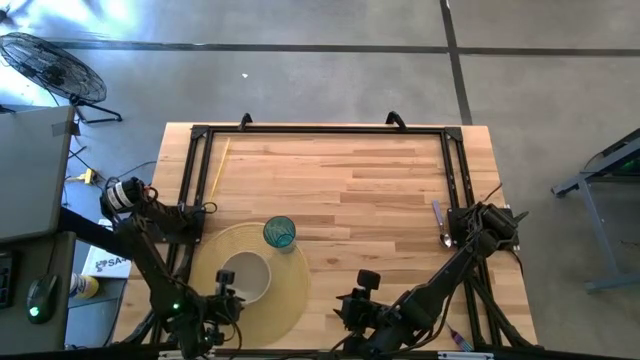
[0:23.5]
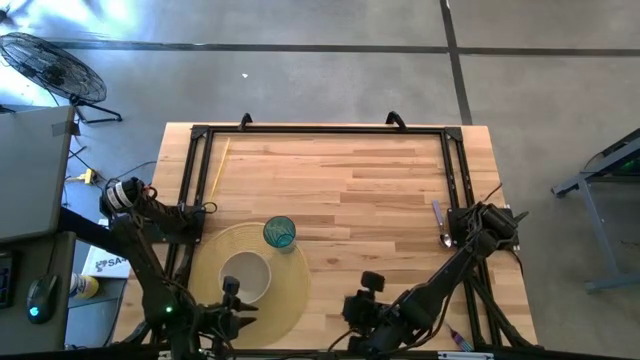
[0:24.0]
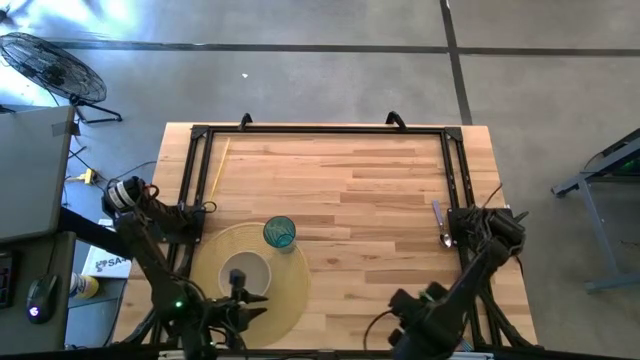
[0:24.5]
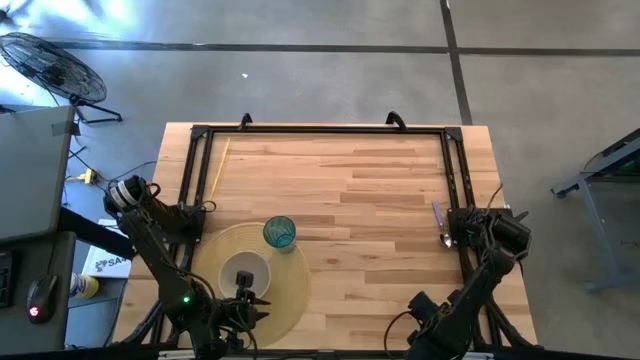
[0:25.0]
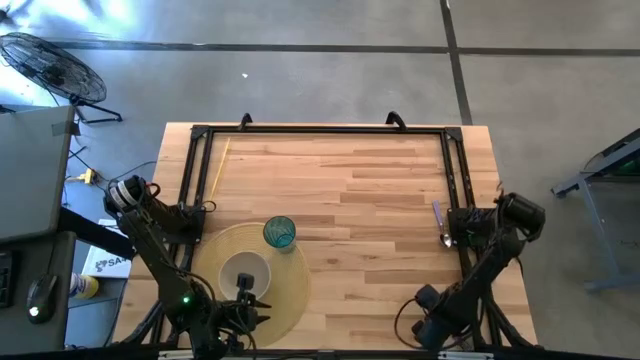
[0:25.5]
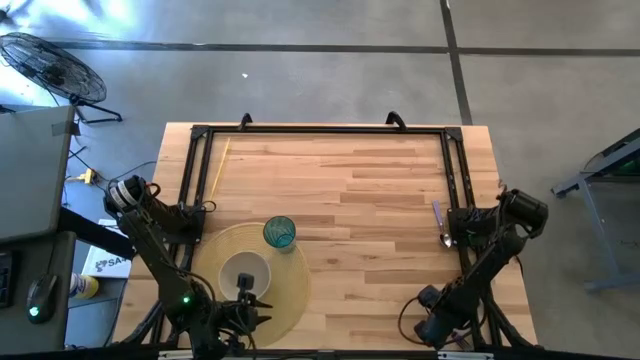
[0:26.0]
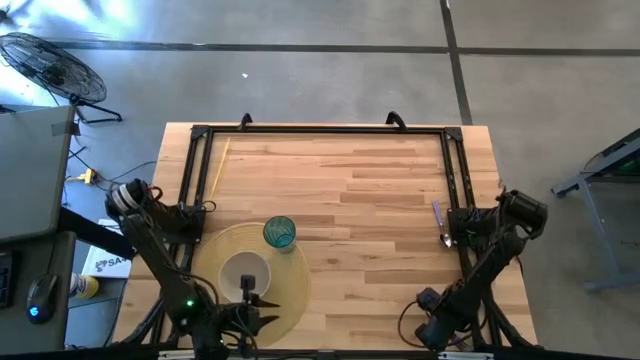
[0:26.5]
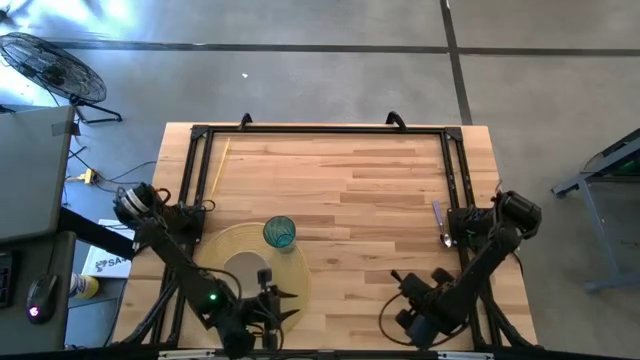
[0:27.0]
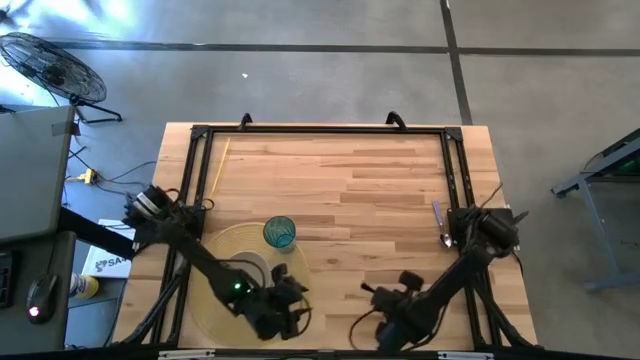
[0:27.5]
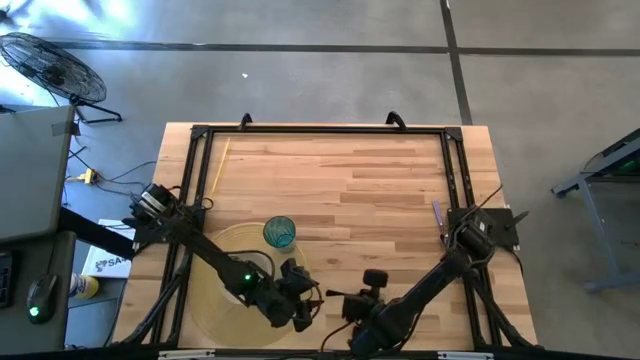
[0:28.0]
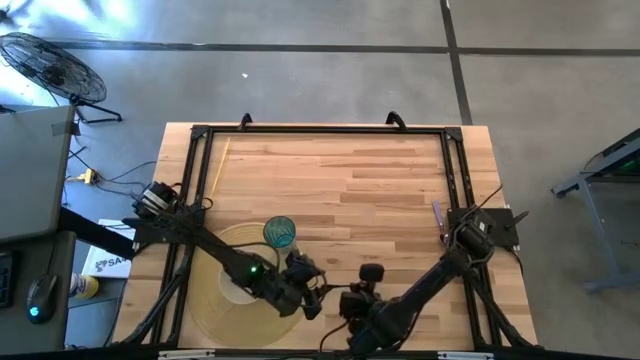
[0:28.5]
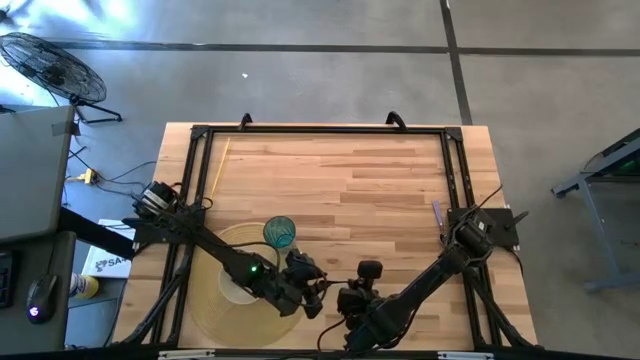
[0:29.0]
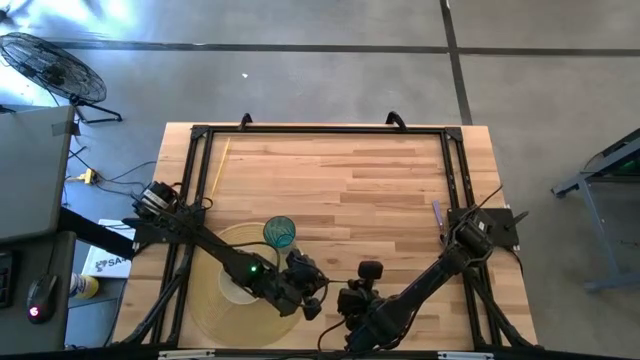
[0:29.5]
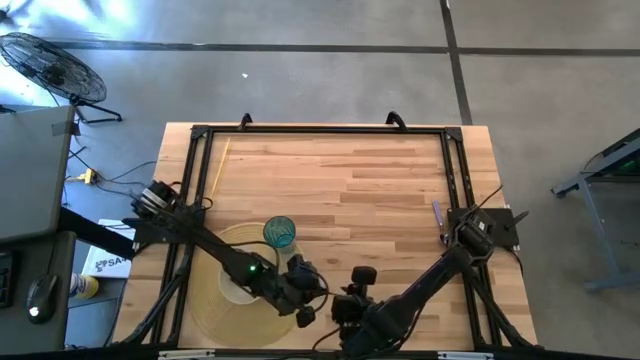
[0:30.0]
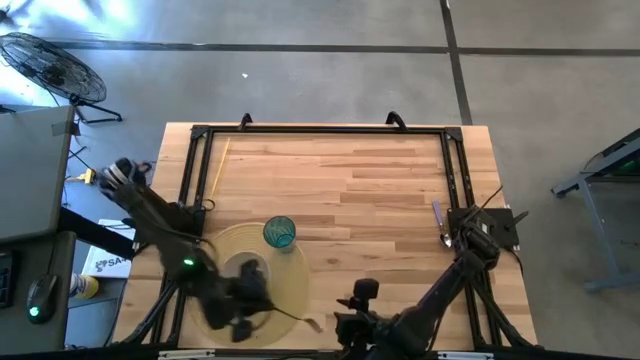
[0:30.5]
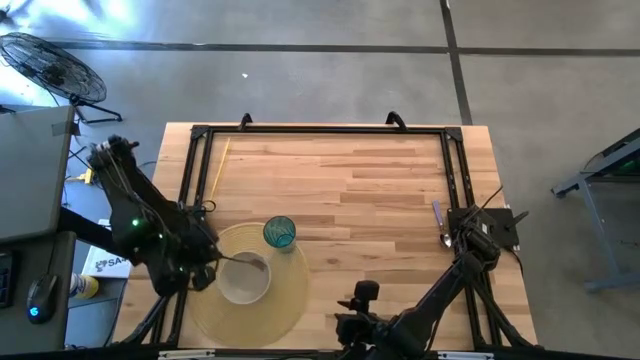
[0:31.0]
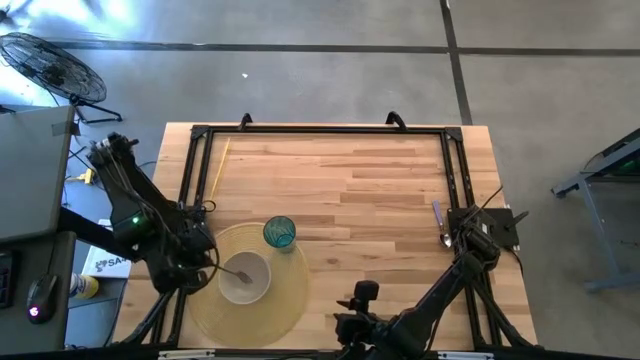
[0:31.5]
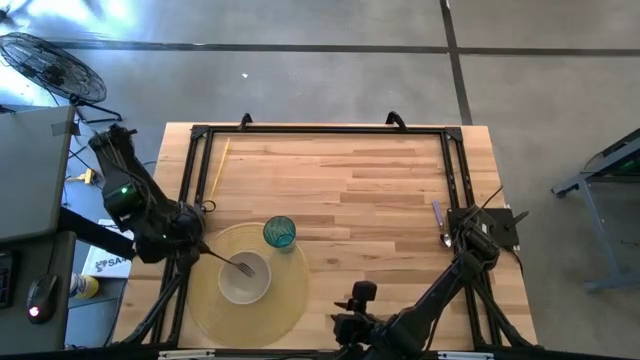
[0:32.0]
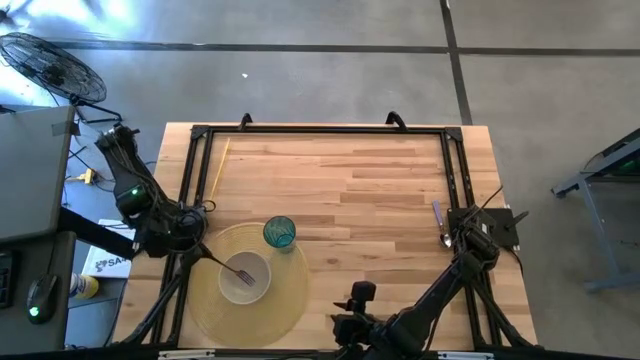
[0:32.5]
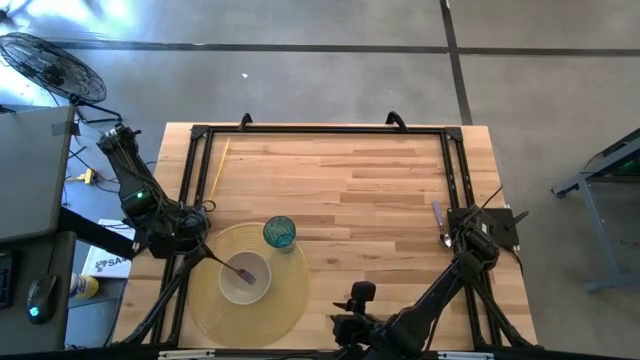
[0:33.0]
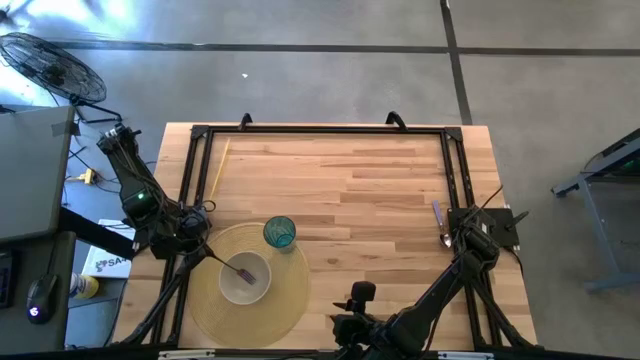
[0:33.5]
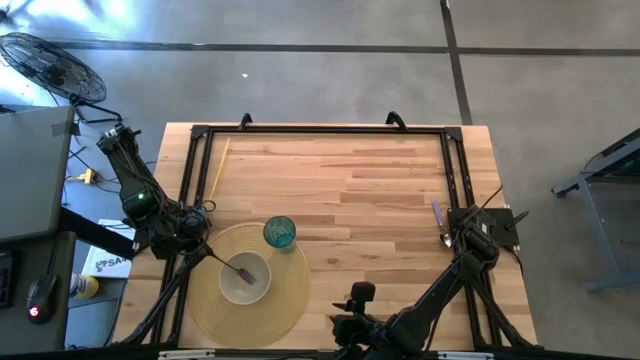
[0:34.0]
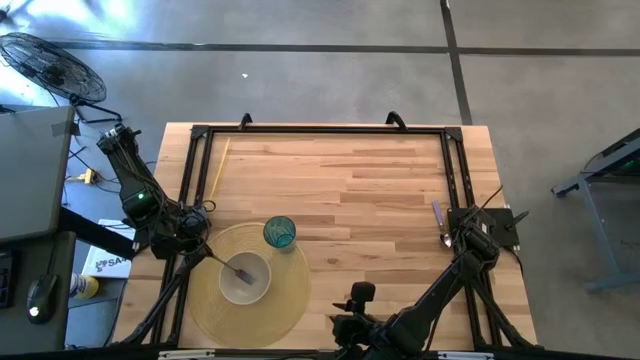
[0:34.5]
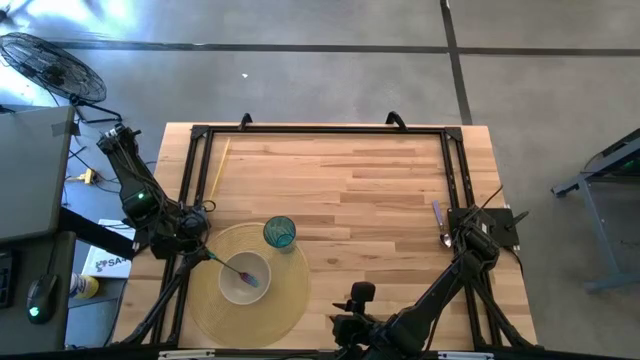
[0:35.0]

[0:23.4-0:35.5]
Task: Pick & Place Utensil
Put the blue fork into the white bowl

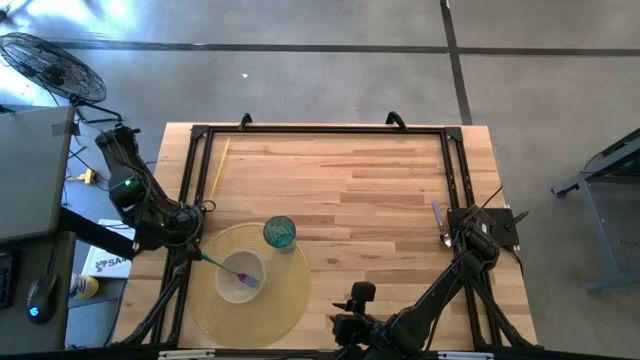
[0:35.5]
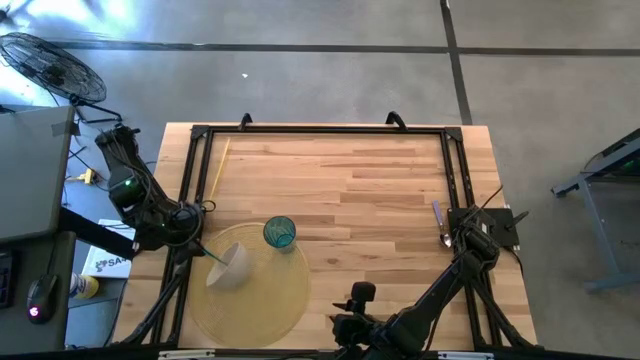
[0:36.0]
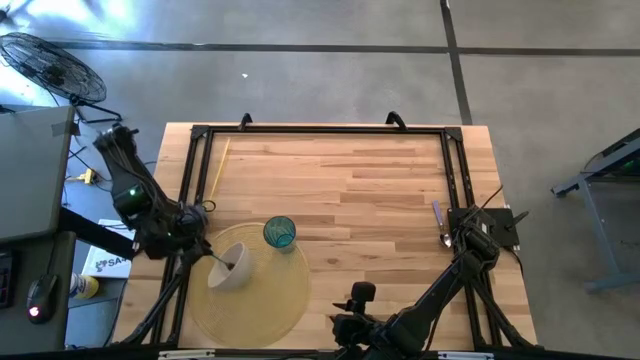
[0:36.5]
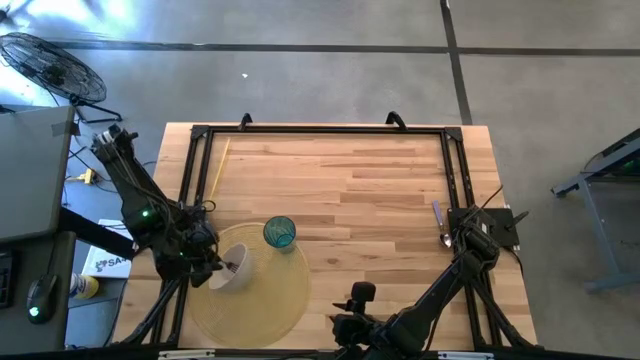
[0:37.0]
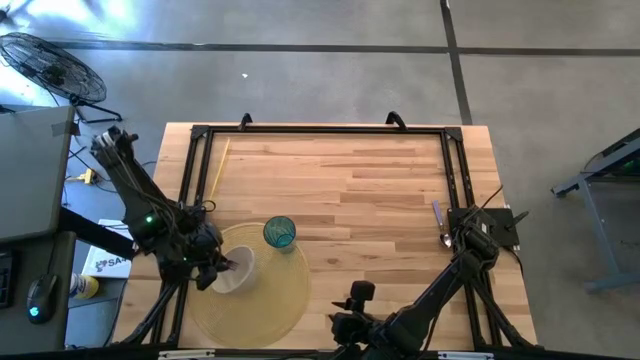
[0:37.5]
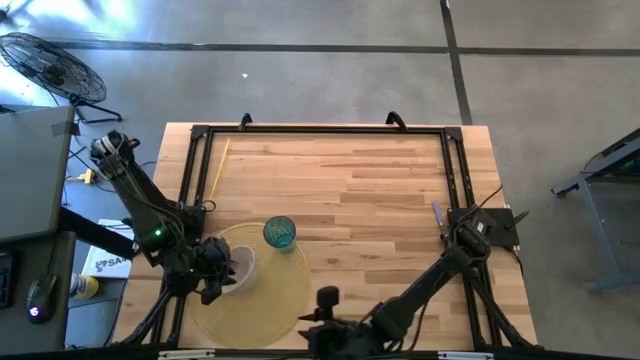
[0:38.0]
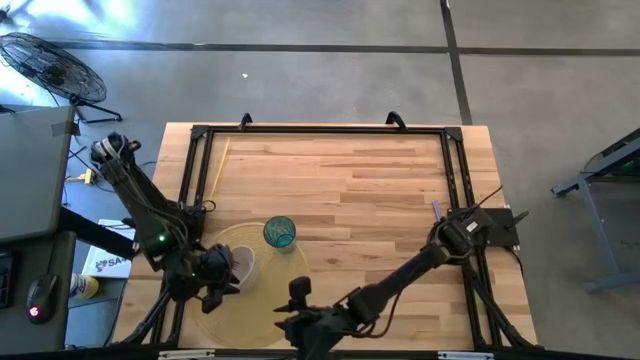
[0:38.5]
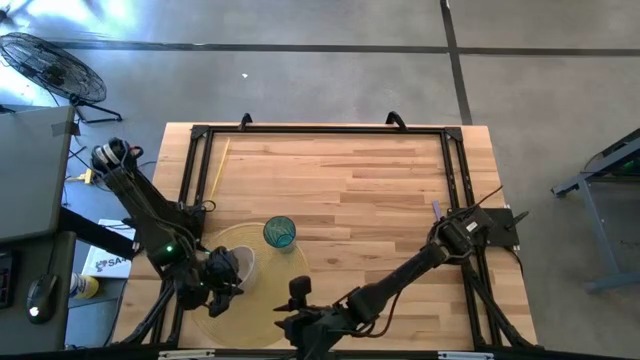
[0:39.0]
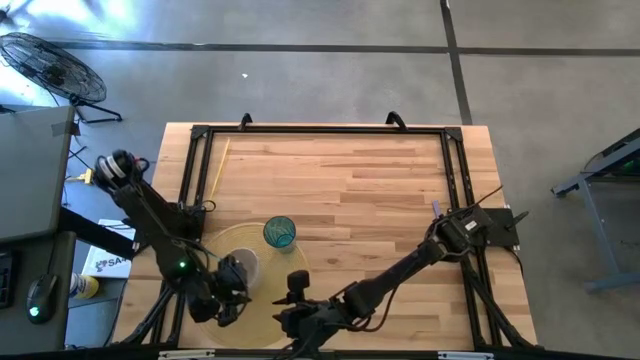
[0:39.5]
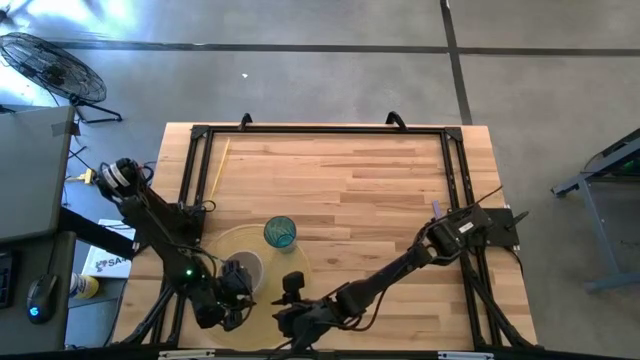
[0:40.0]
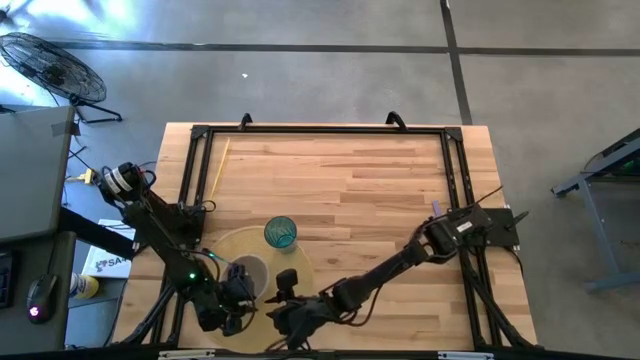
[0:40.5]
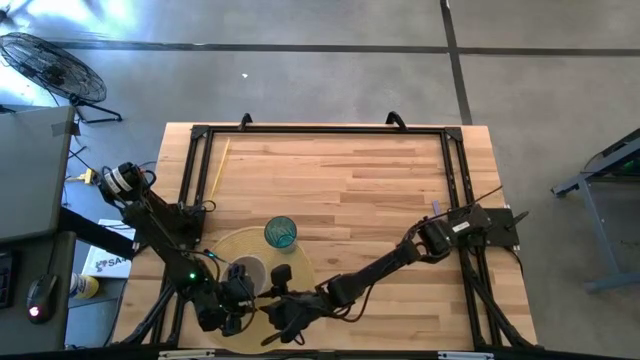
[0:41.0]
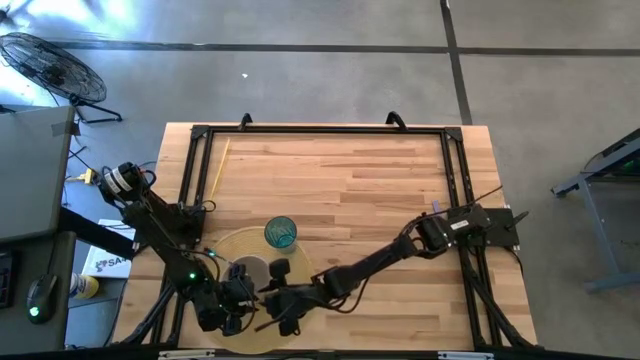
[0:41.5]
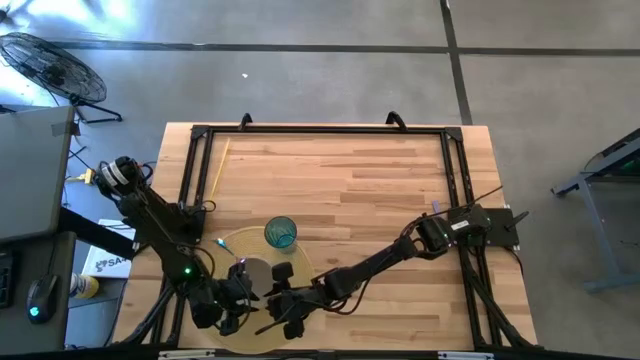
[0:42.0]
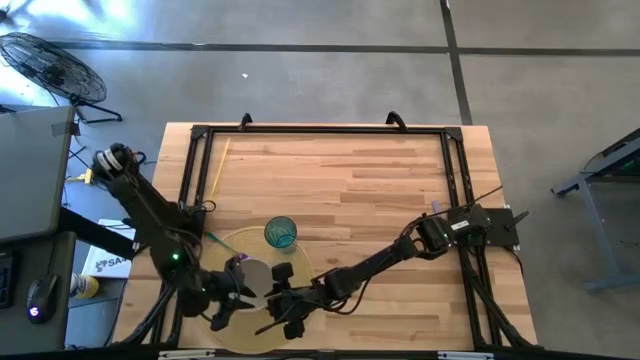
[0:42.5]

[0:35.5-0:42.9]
Adjust the white bowl

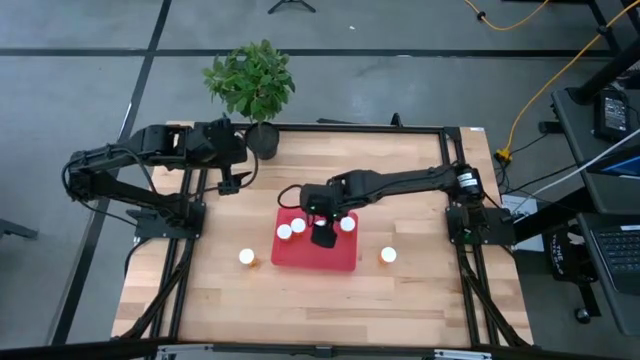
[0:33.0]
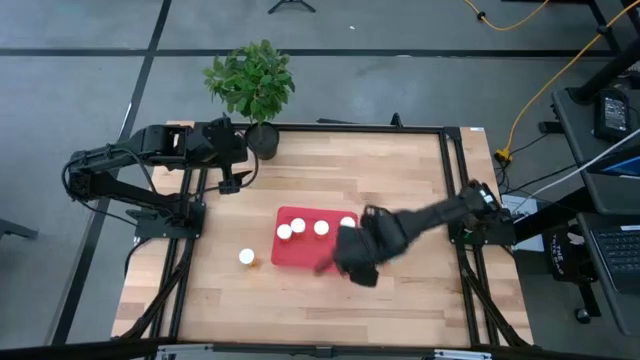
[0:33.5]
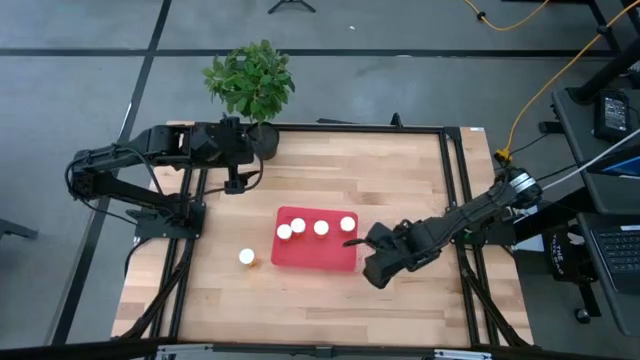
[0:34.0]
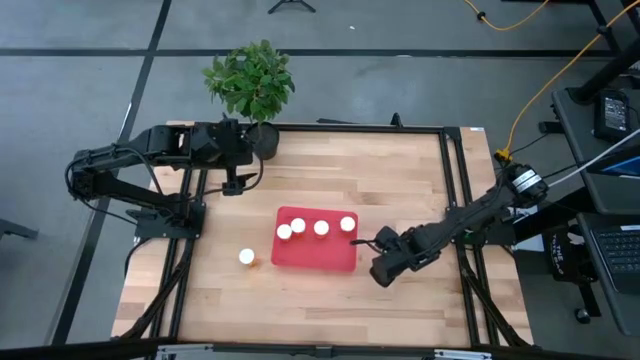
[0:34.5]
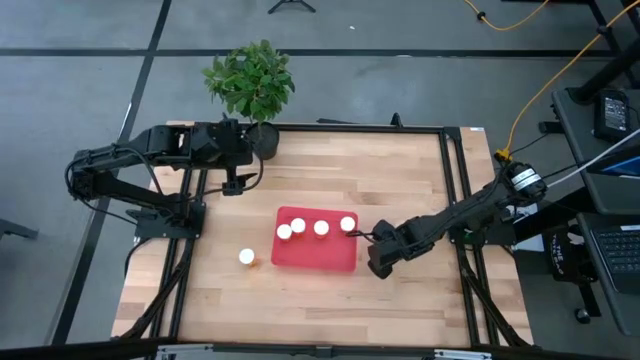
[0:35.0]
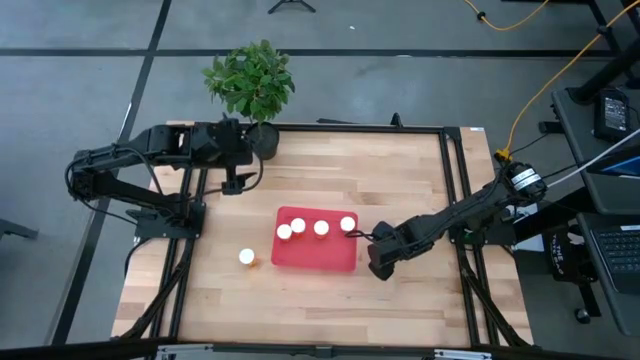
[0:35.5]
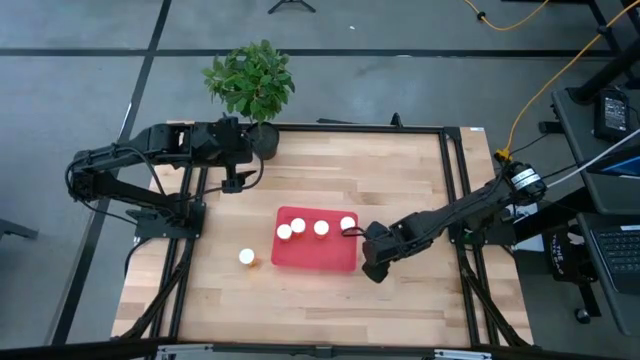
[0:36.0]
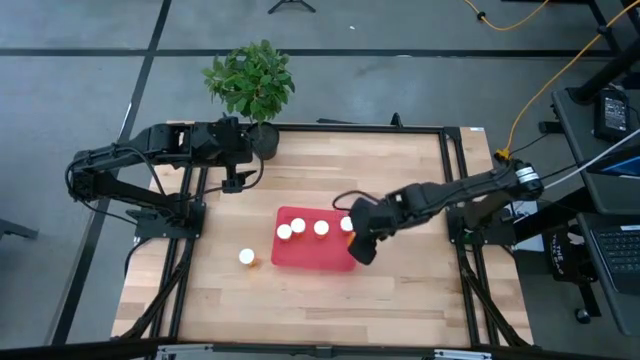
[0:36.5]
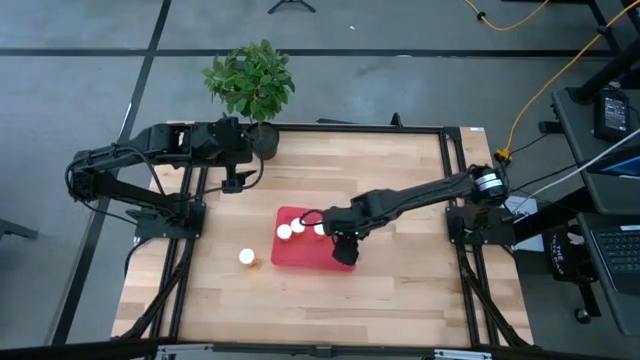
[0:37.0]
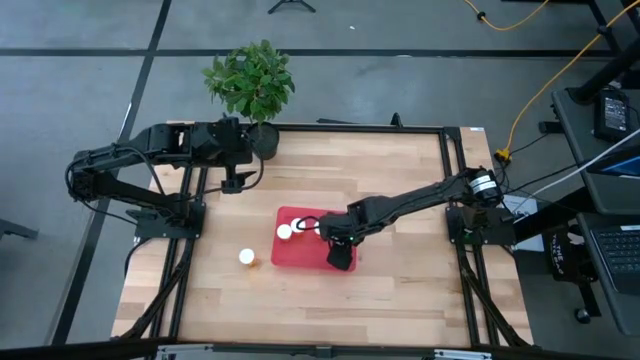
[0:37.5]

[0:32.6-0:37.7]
Task: Pick and place pill bottles into a basket
Put the left orange pill bottle into the bin
